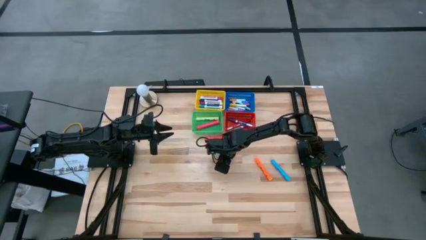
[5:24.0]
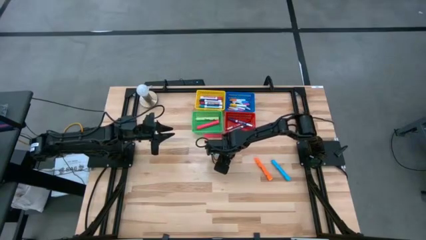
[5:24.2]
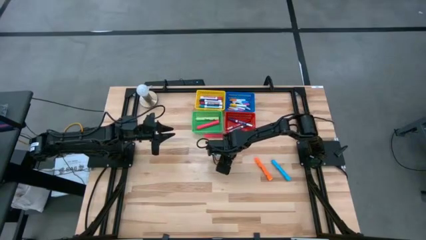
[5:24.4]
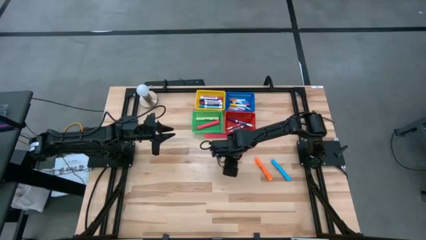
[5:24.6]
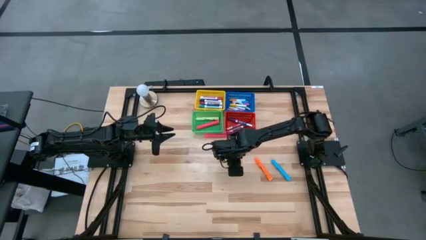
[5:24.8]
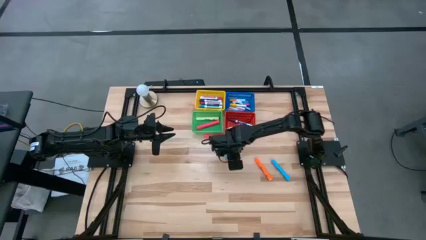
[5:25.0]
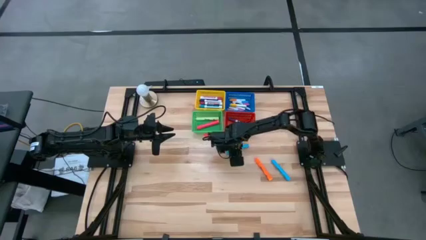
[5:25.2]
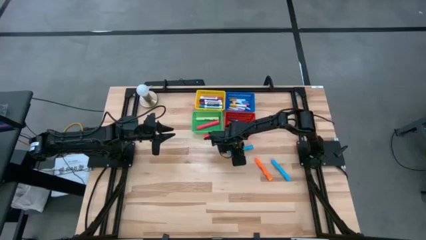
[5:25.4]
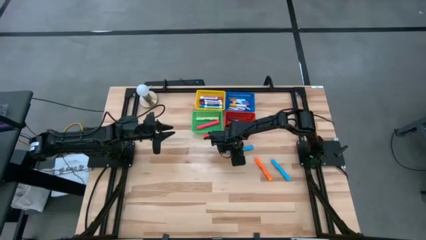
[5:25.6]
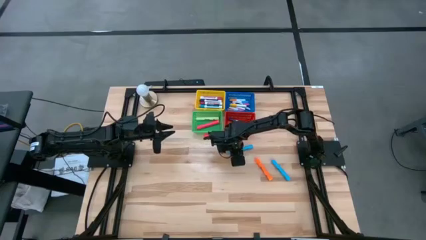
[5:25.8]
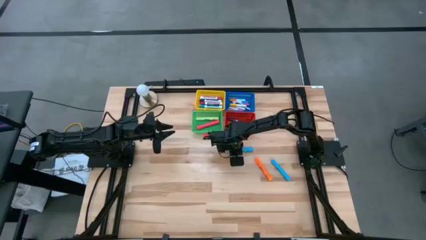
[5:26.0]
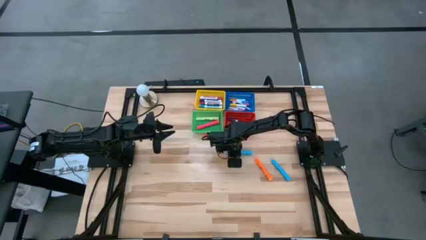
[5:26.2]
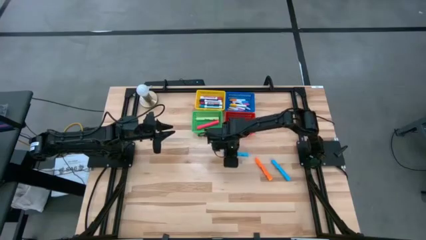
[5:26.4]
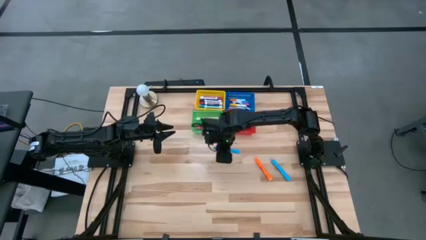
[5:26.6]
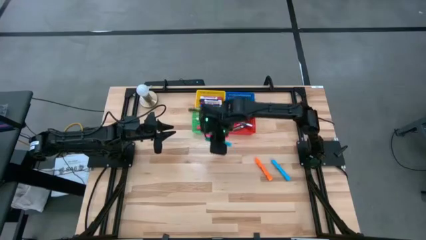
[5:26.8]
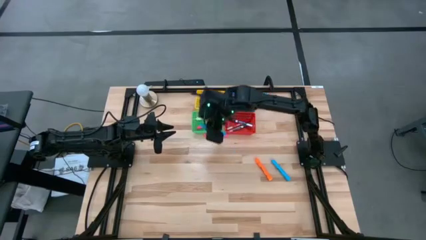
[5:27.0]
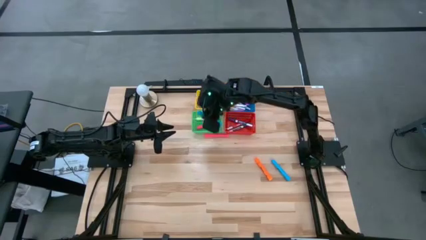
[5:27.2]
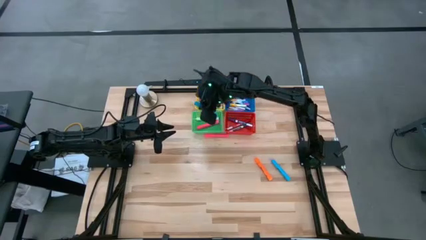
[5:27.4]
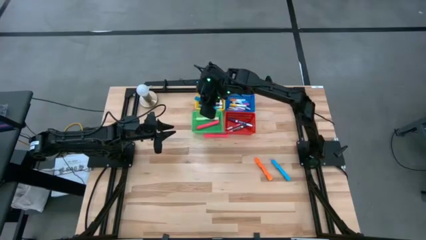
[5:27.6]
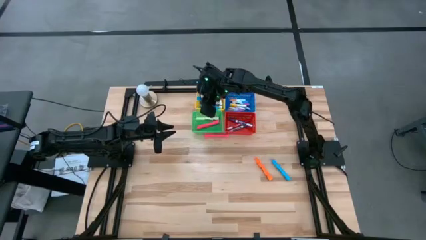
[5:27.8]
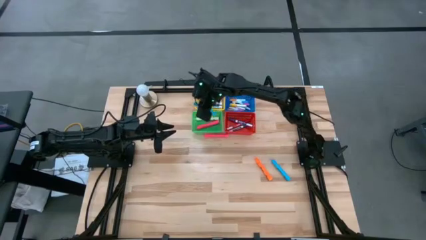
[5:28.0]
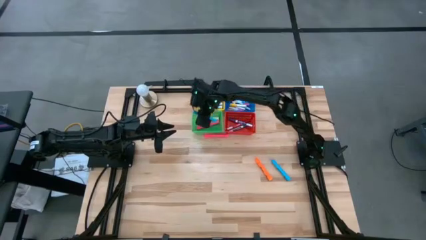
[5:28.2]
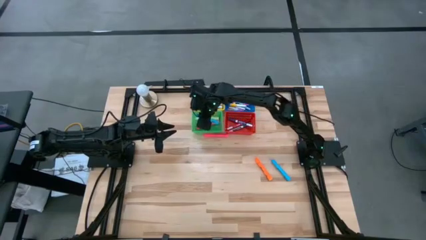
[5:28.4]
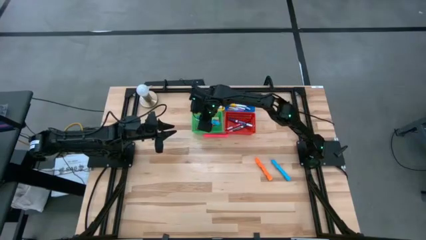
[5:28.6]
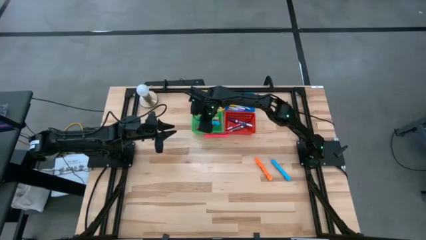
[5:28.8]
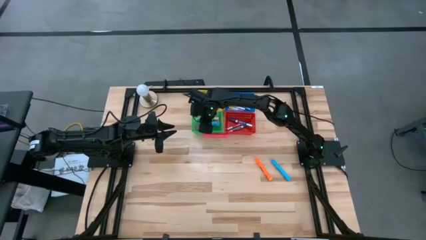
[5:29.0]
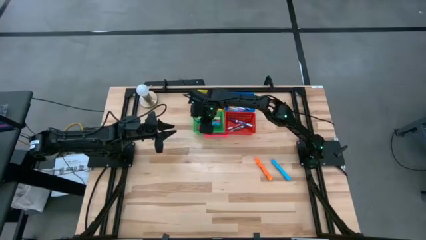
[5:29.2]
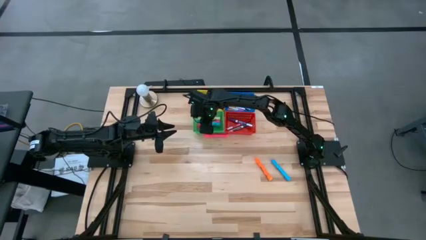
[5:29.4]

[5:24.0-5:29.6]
Task: Pick & Place Markers
Put the top large blue highlighter pen into the green bin
